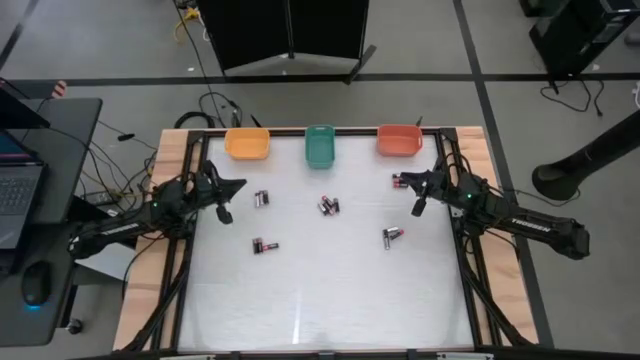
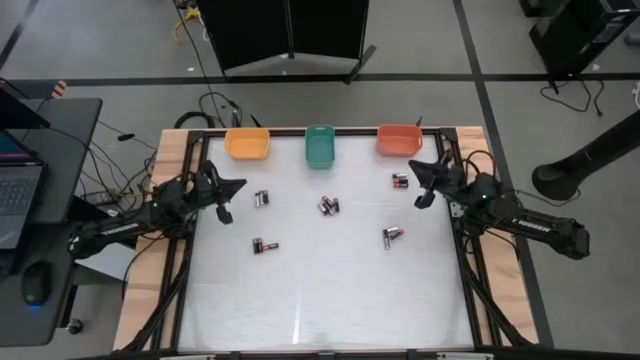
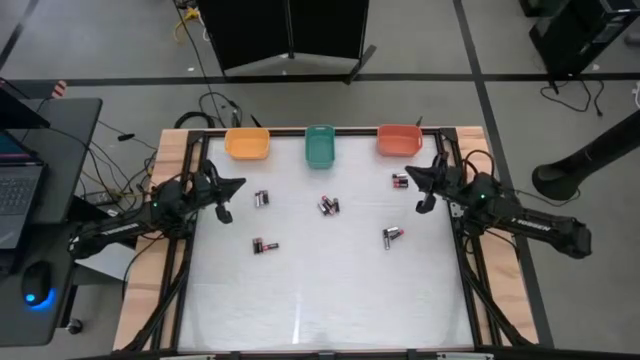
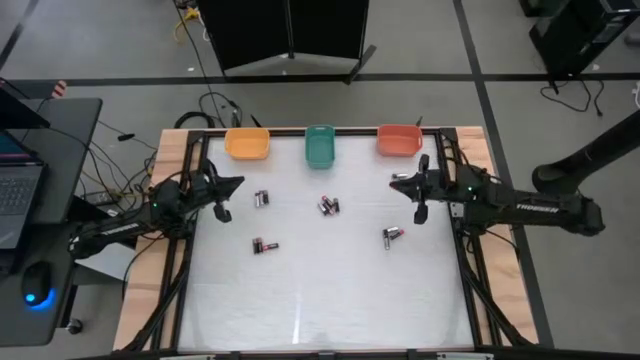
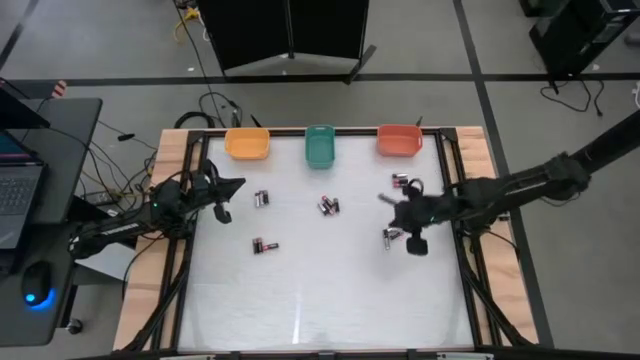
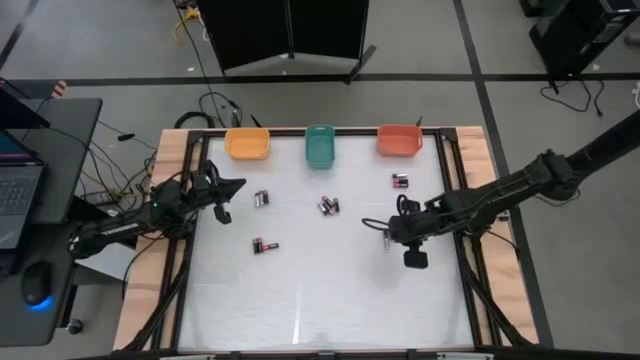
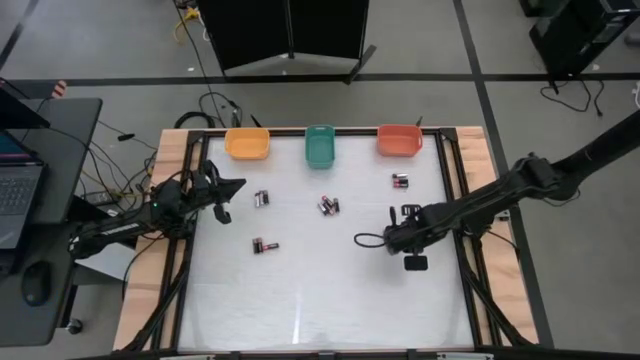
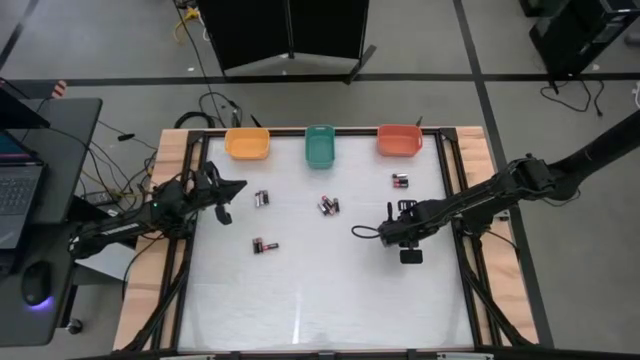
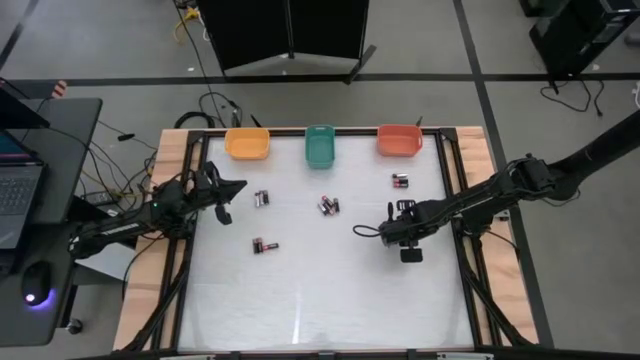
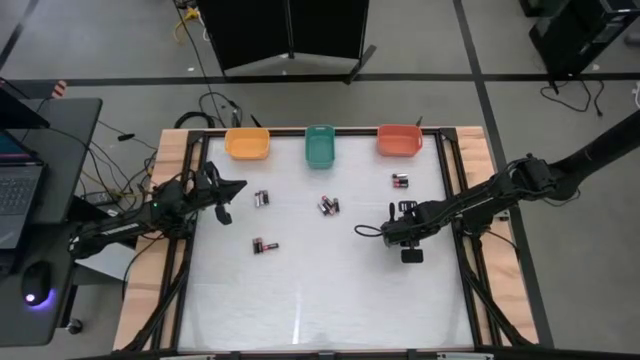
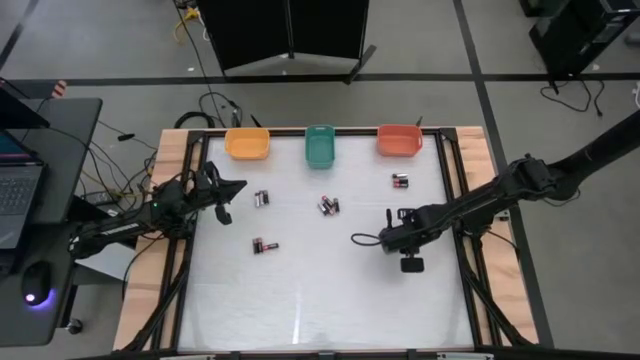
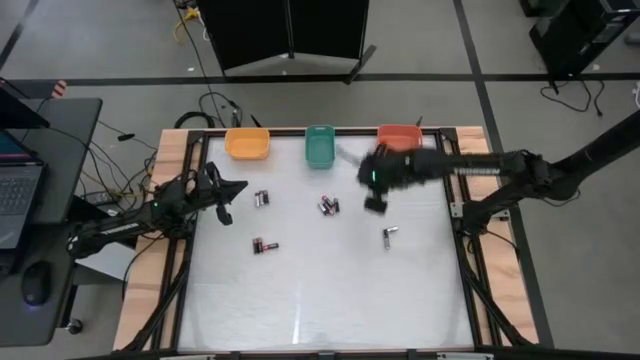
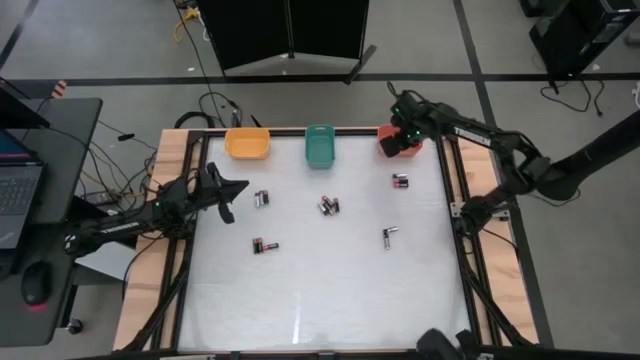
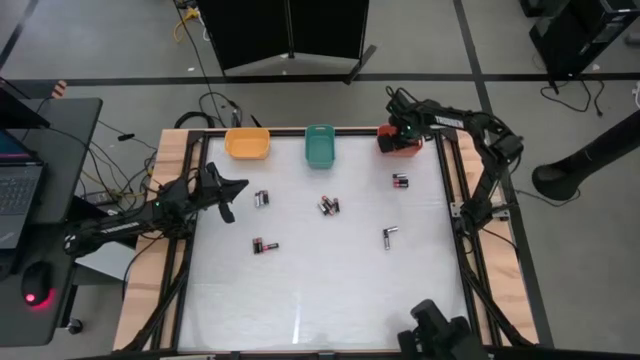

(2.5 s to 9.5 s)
Task: Sort batteries
Put the red battery into the orange bin

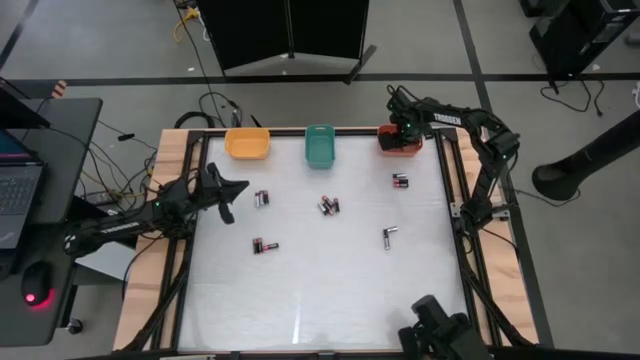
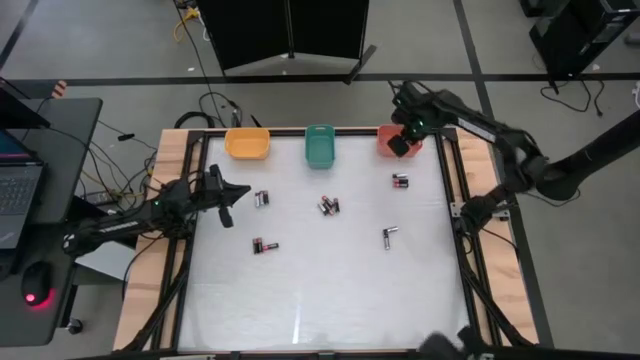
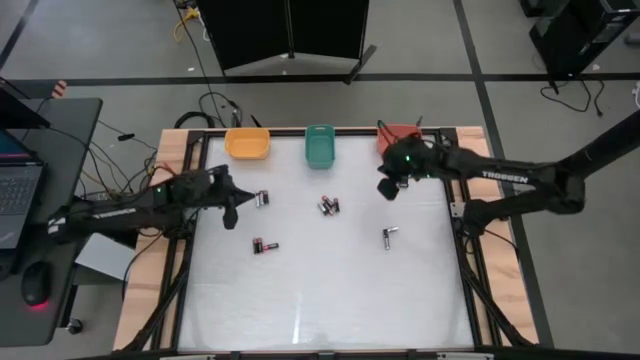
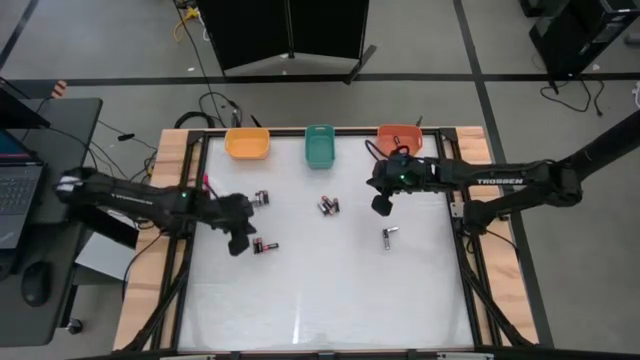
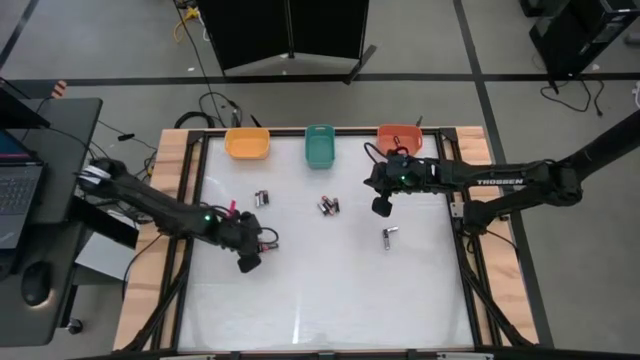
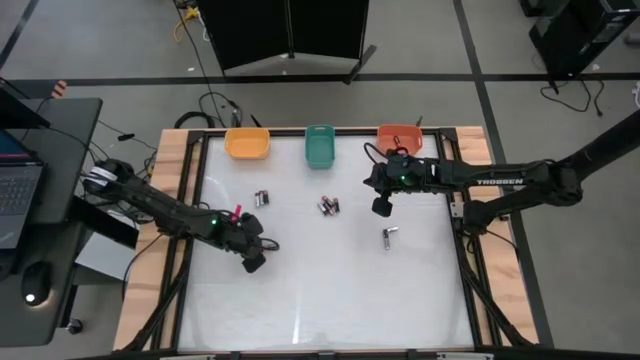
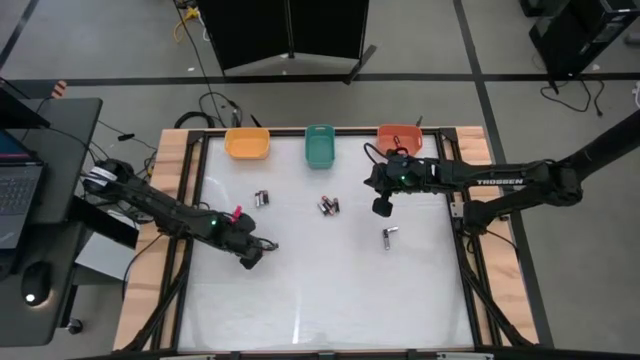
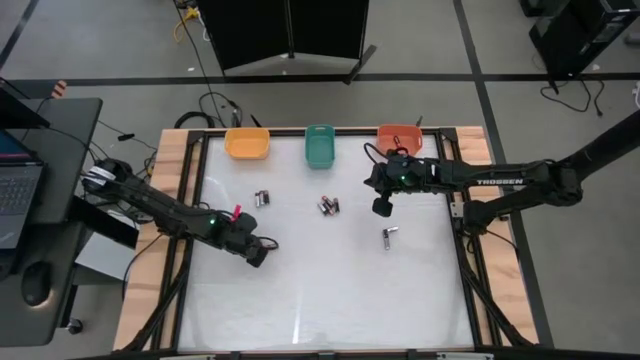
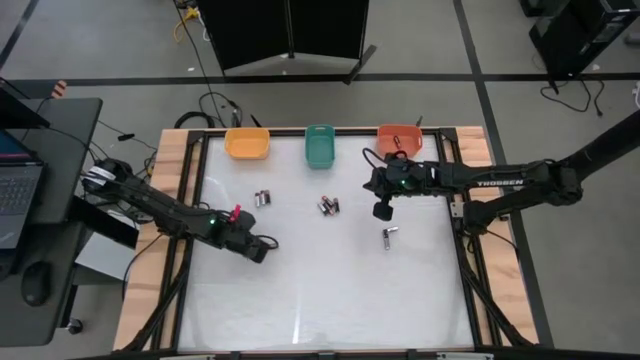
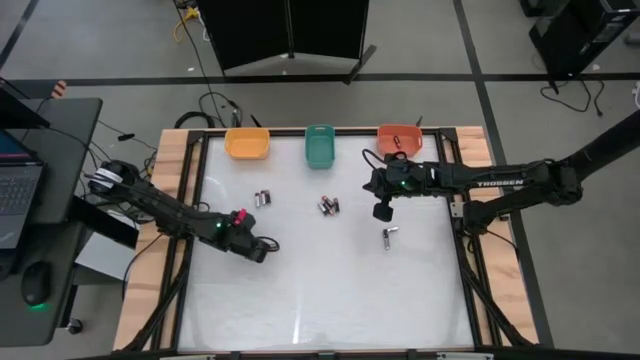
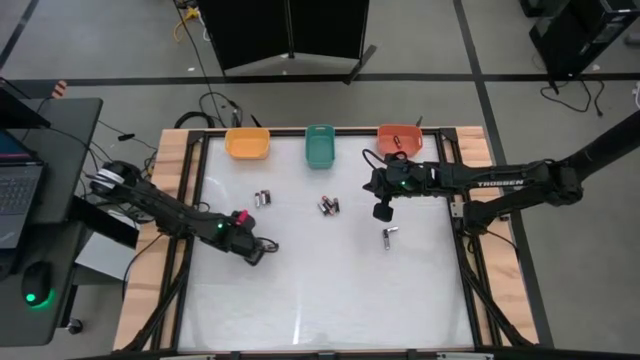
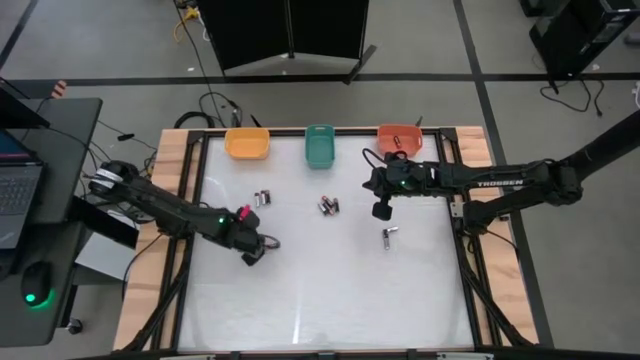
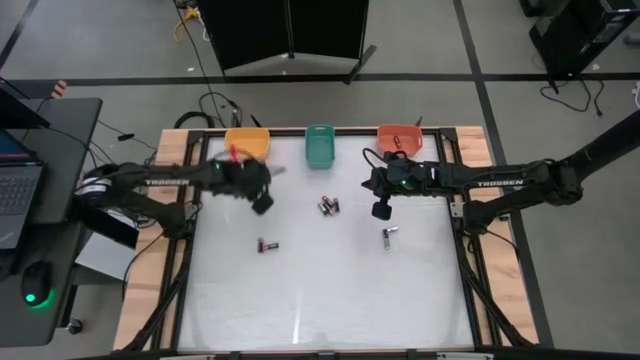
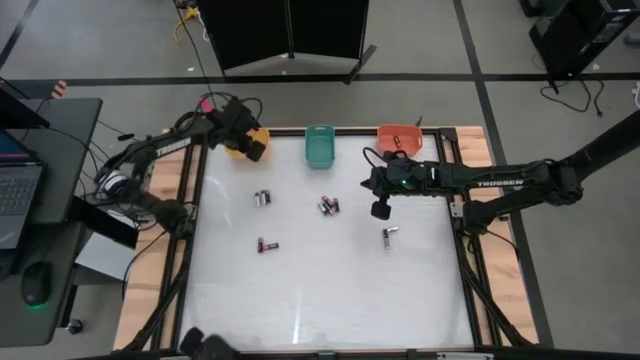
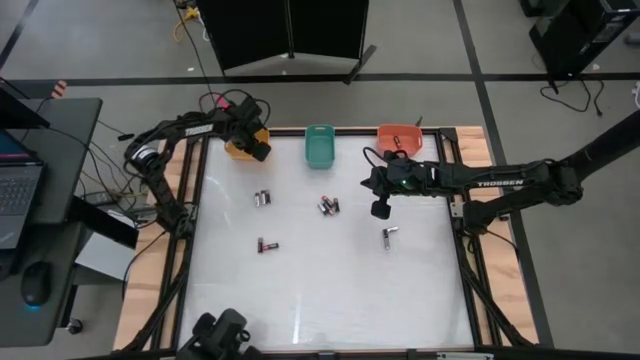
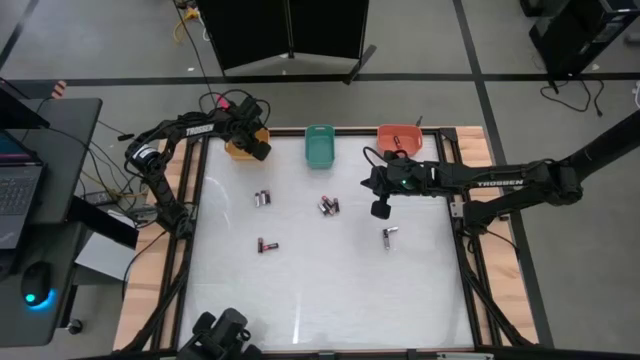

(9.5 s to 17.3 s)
Put the black battery into the yellow bin

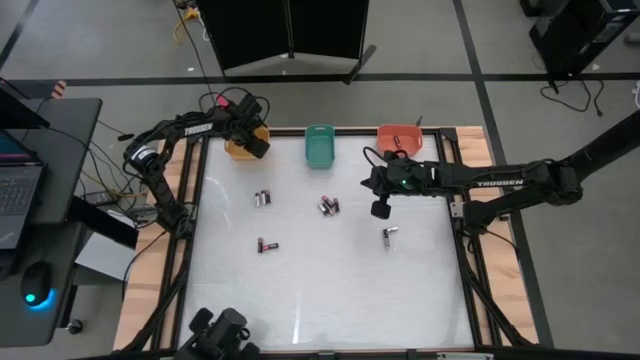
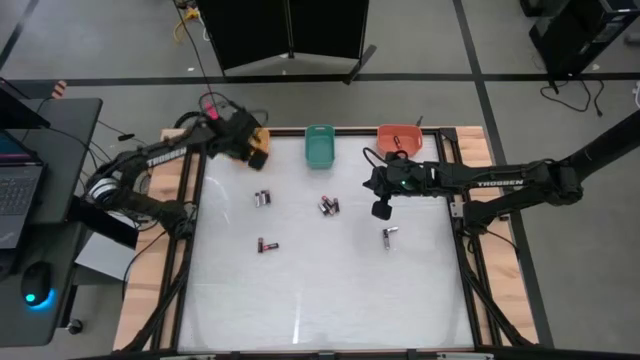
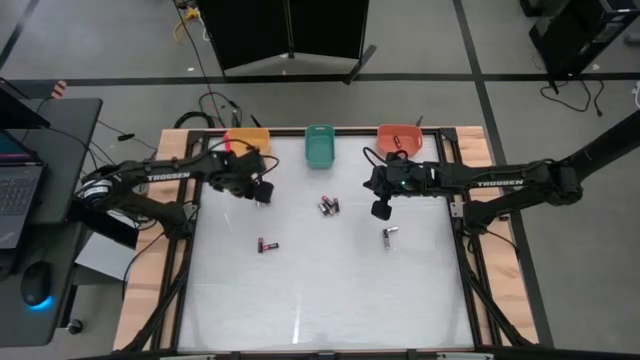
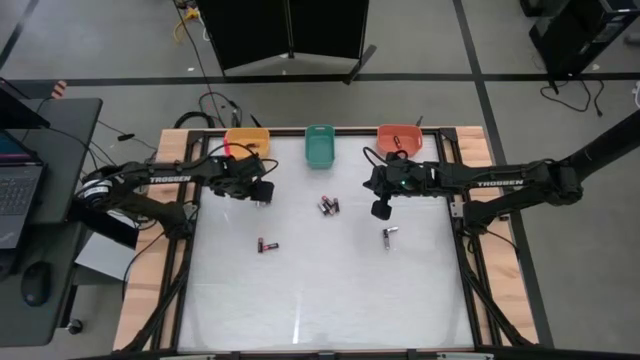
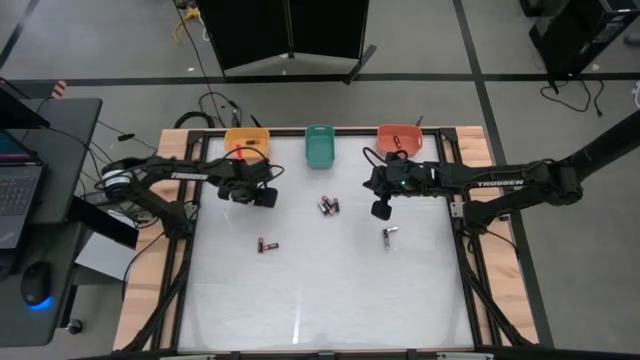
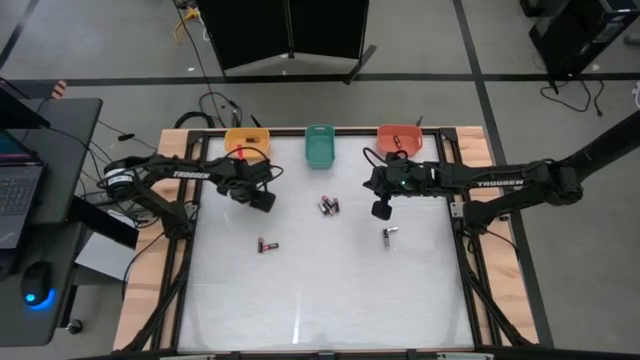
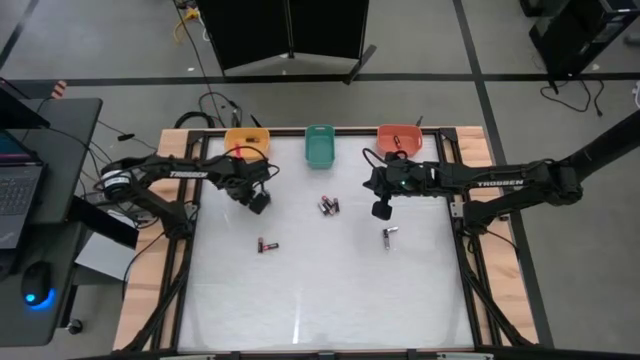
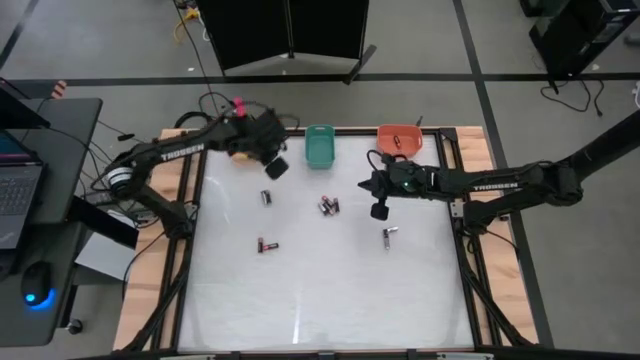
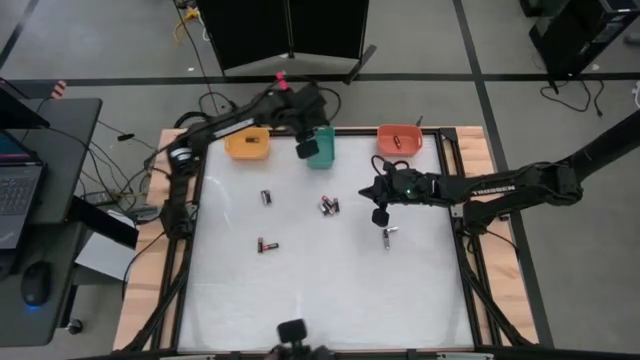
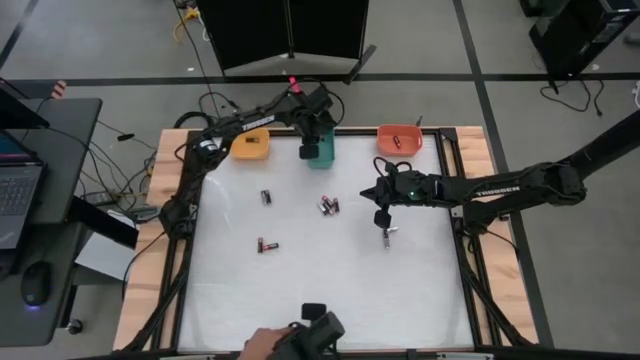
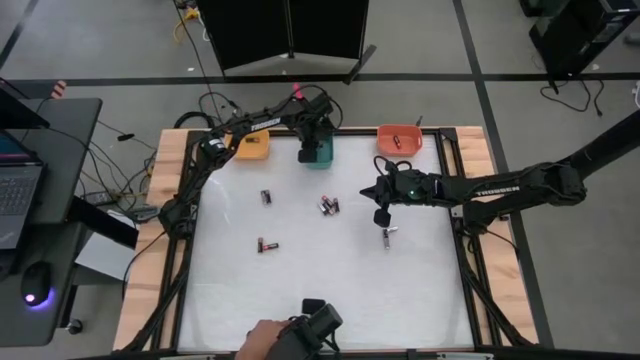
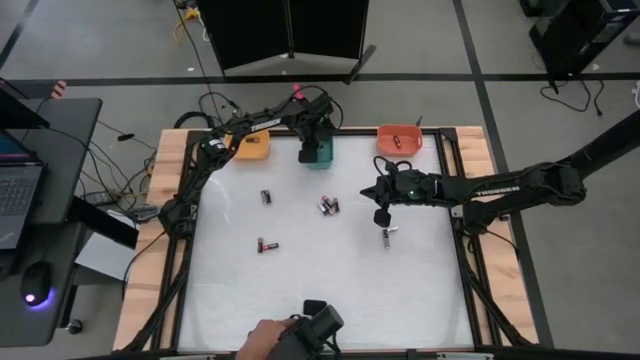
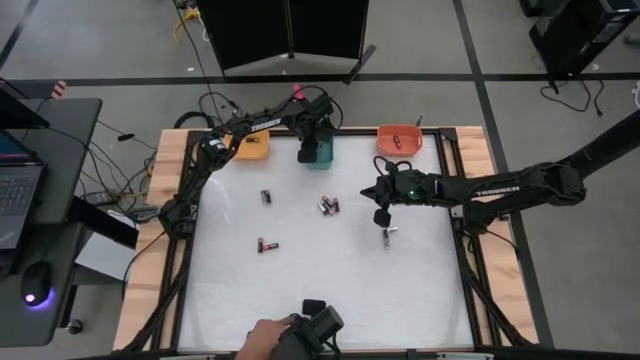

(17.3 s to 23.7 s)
Put the silver battery into the green bin

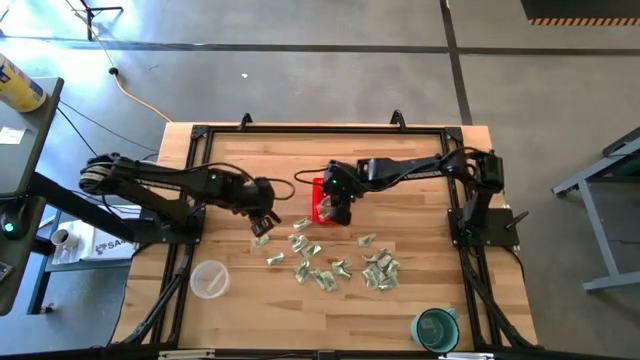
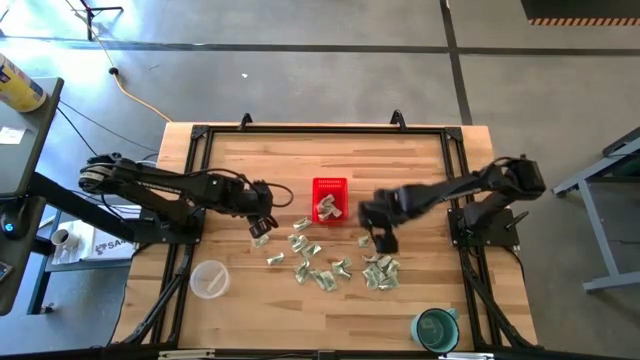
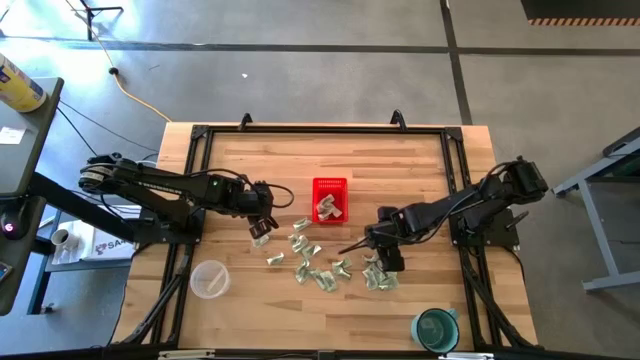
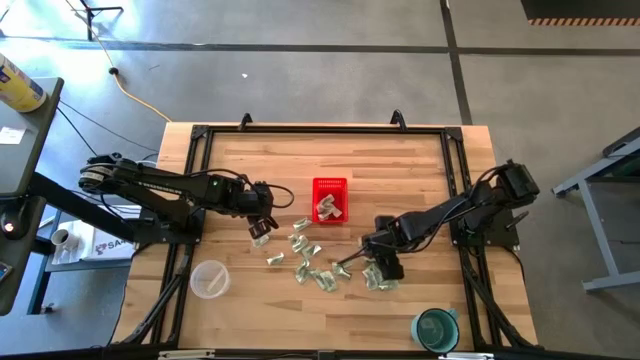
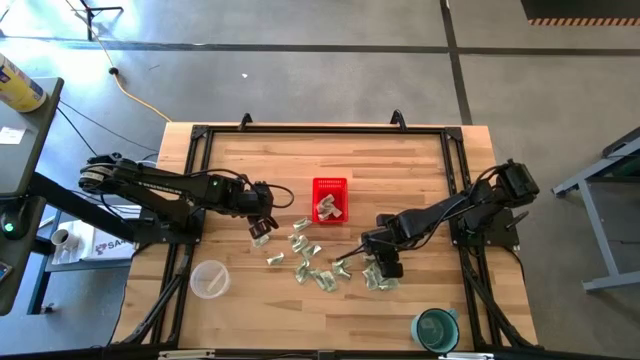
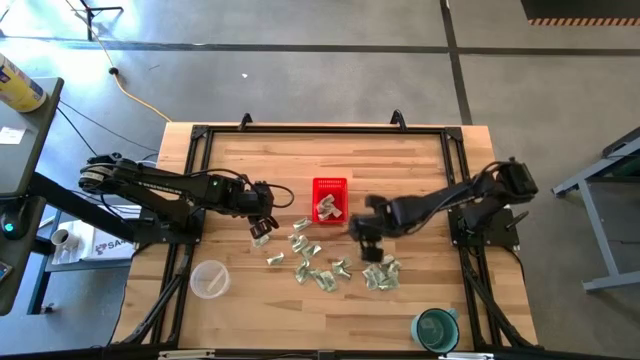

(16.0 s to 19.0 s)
Task: Pick and place items into bin
Put the light green stevia packet into the red bin
